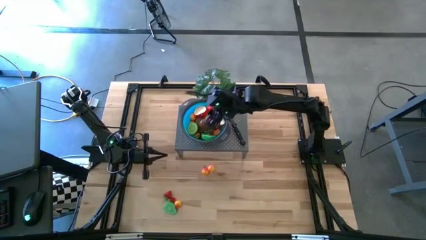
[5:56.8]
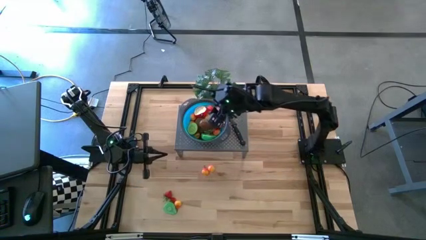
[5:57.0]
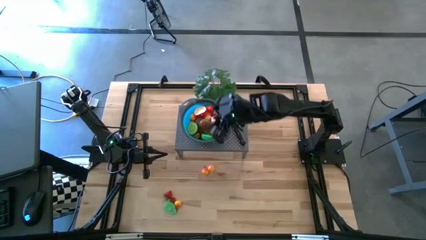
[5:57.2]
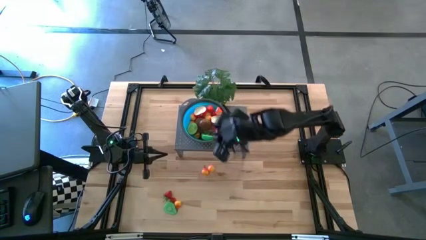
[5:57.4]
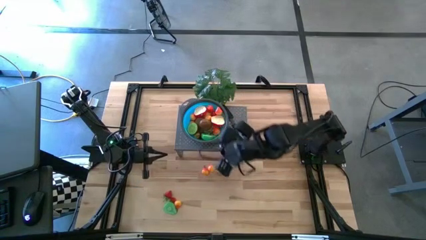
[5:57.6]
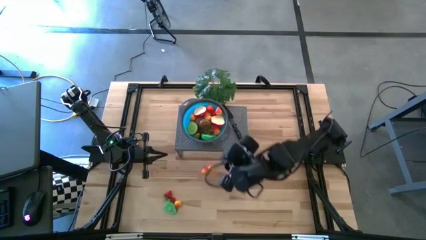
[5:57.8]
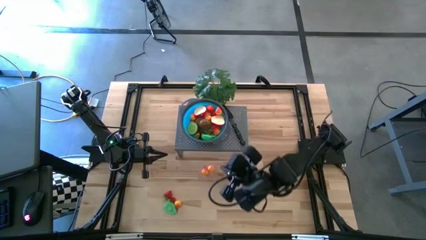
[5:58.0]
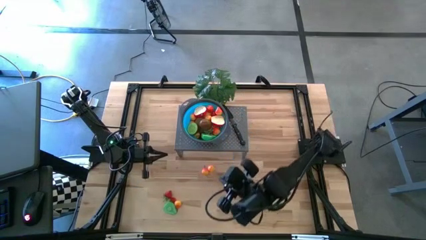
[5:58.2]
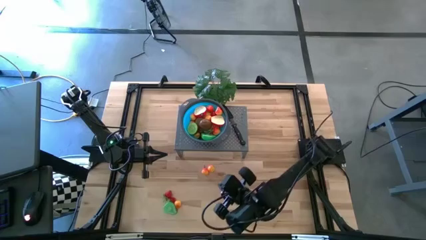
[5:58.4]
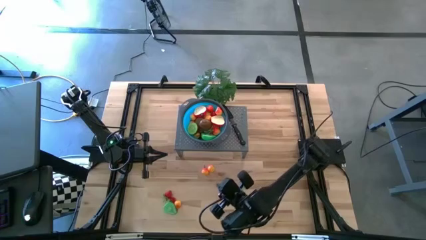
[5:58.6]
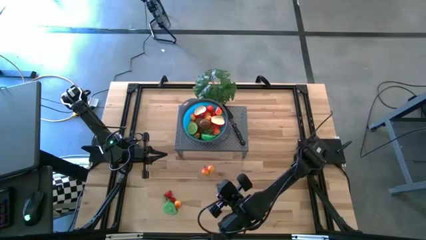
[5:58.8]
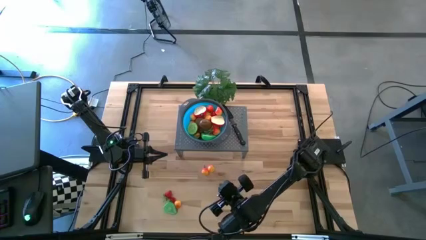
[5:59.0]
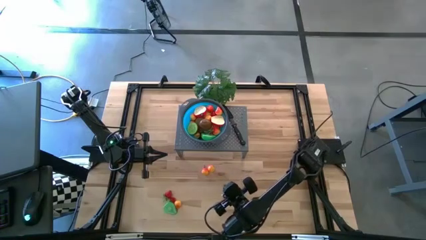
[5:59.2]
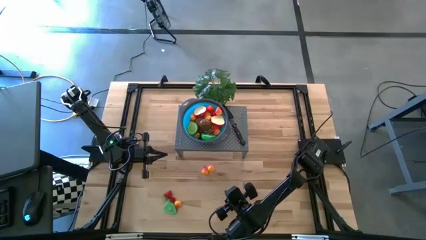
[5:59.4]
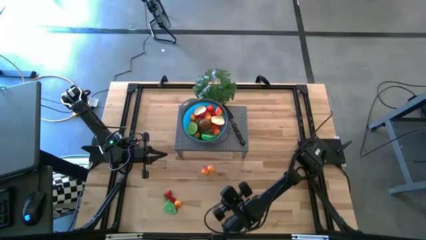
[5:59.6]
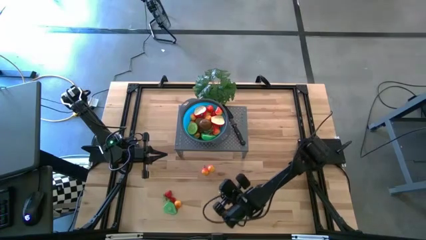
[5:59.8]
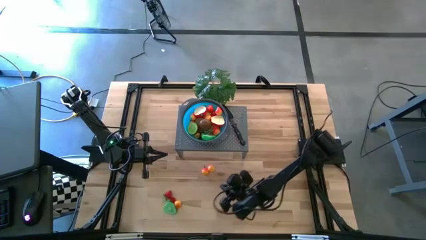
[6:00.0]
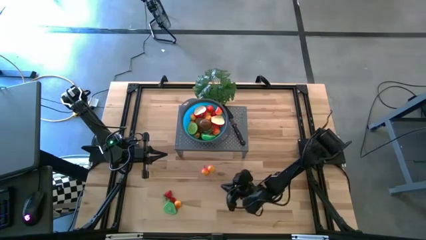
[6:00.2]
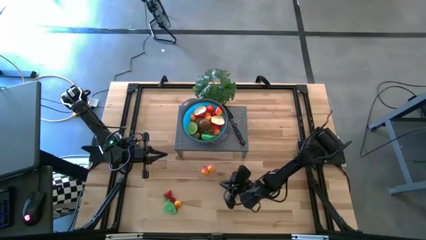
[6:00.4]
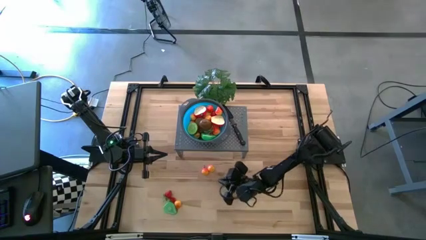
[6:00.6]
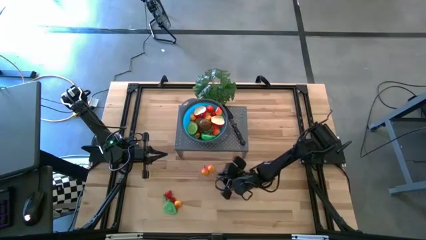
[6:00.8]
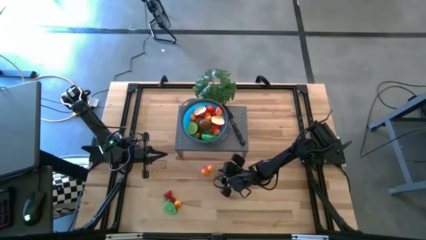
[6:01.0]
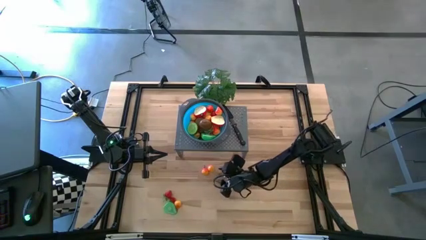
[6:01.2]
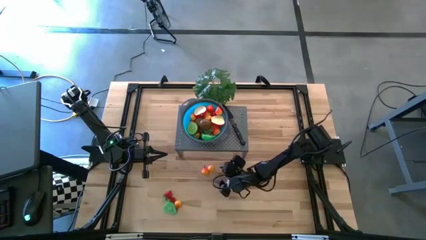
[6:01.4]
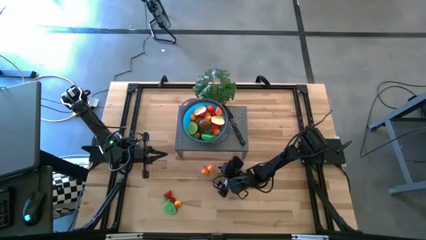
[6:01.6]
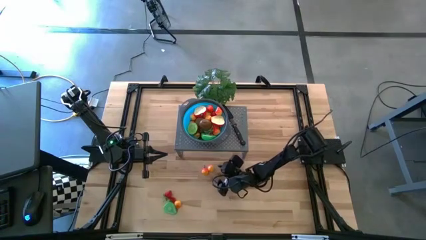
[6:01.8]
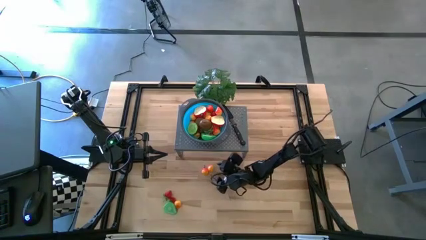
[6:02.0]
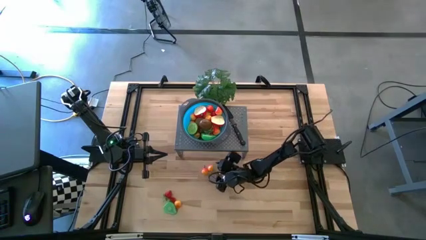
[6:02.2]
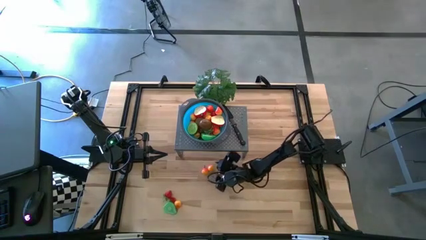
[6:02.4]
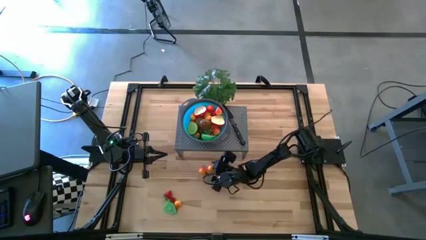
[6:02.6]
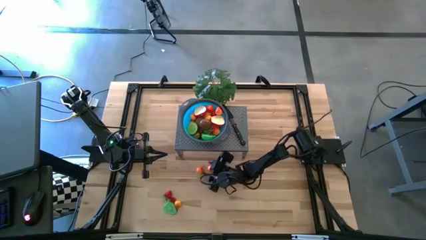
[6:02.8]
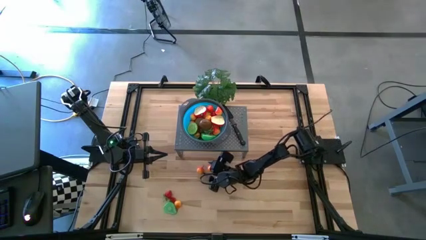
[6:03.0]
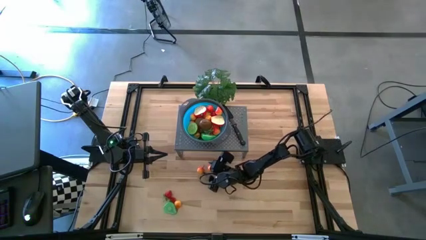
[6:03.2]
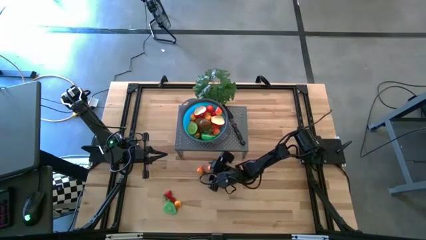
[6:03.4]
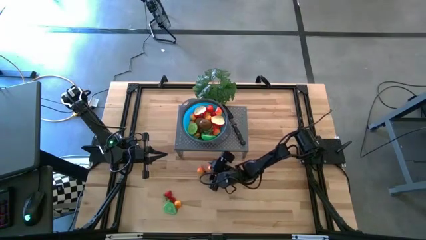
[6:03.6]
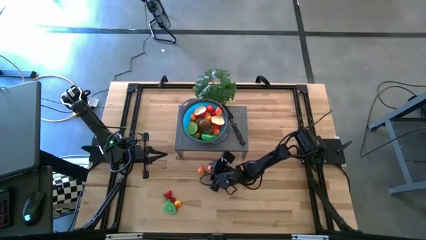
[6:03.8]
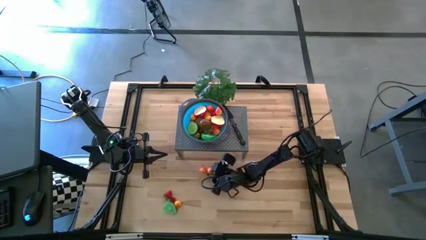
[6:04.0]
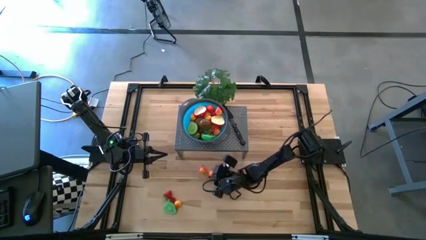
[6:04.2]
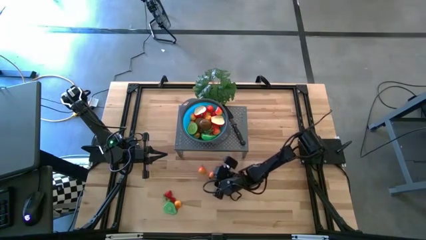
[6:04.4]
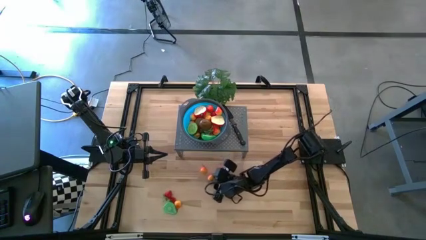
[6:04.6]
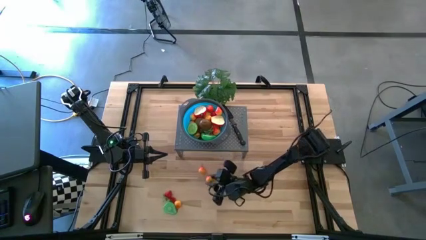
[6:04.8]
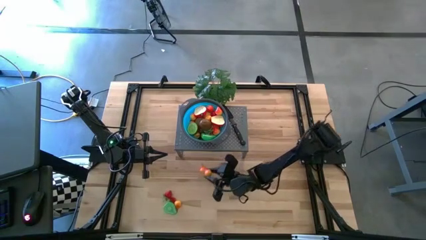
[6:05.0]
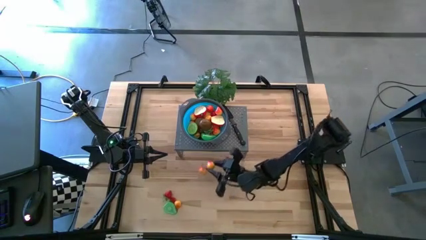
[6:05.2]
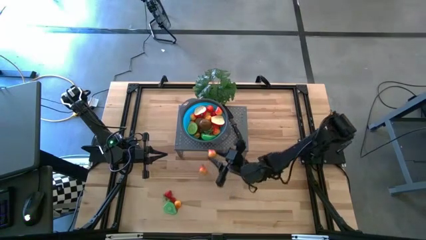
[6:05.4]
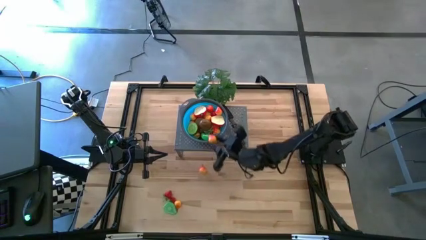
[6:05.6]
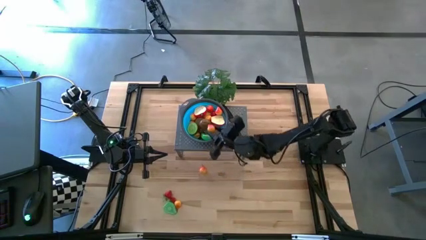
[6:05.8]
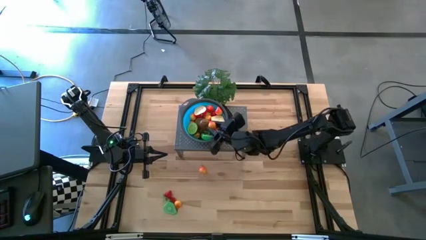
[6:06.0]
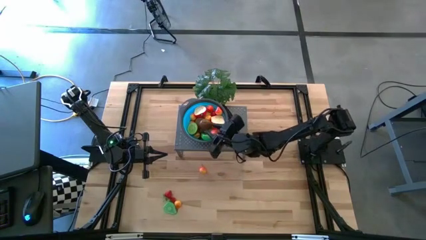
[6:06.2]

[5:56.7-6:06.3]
Task: Pick & Place Fruit
Put the pear into the blue strainer bowl on the shelf
